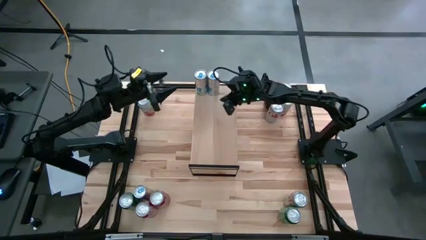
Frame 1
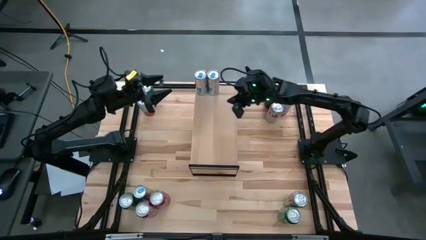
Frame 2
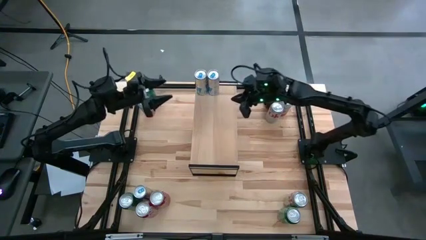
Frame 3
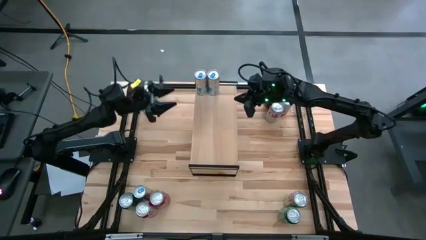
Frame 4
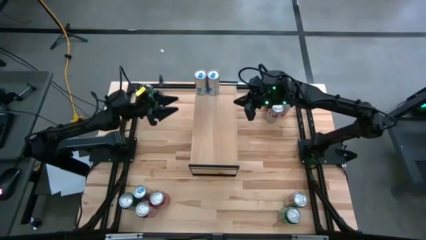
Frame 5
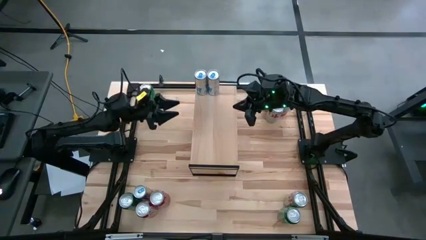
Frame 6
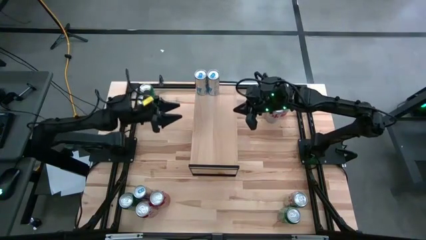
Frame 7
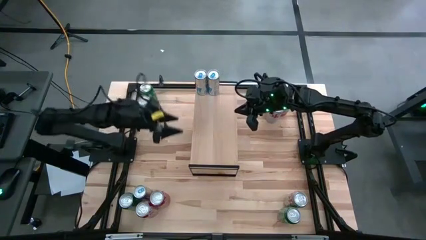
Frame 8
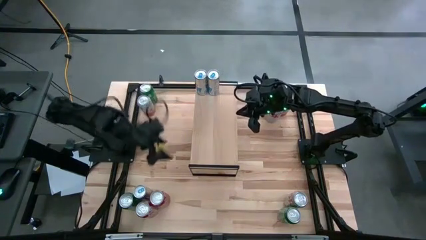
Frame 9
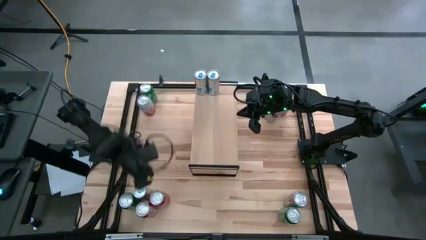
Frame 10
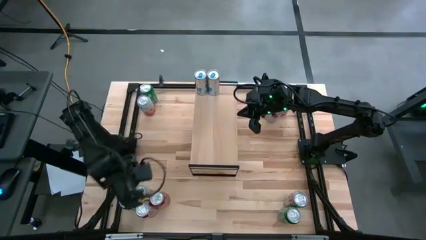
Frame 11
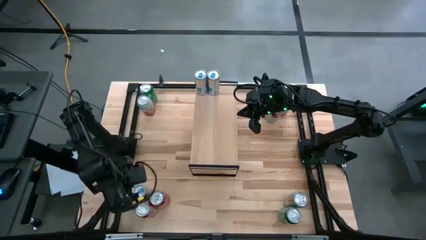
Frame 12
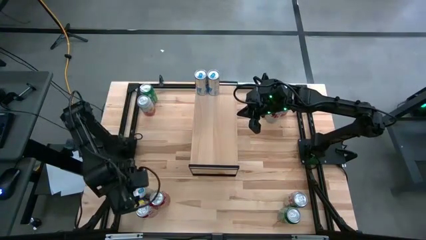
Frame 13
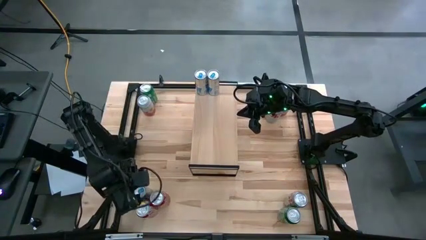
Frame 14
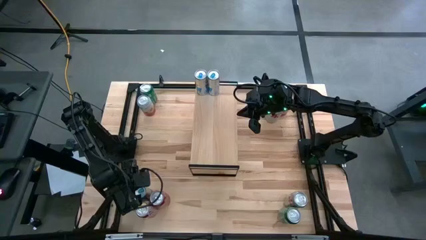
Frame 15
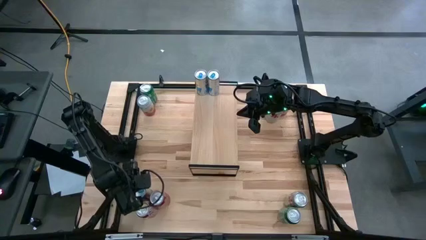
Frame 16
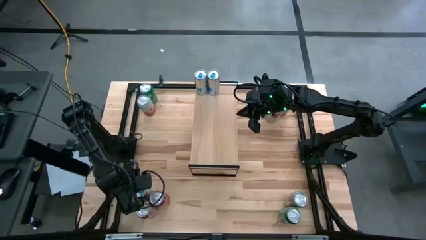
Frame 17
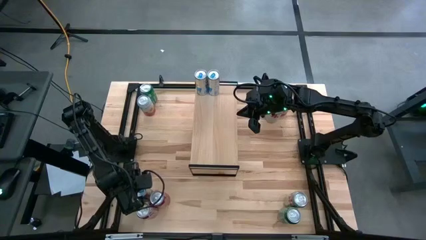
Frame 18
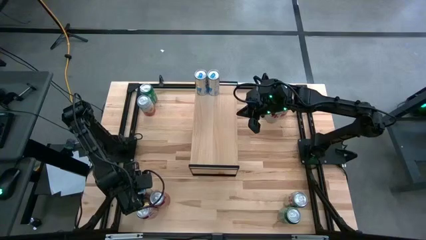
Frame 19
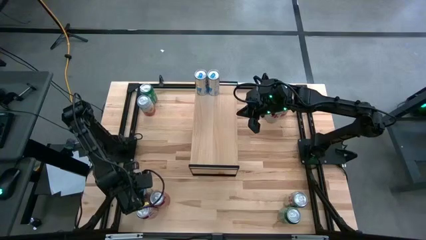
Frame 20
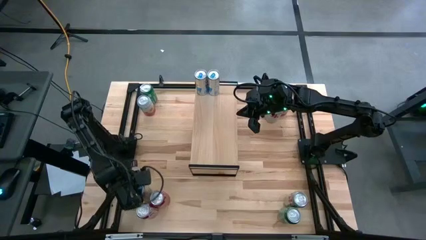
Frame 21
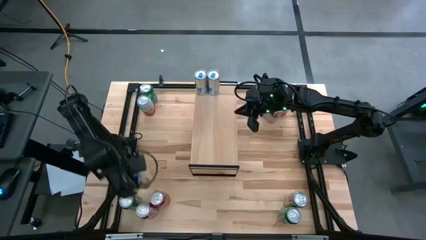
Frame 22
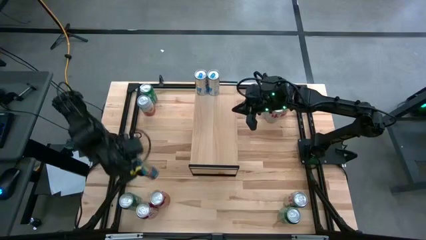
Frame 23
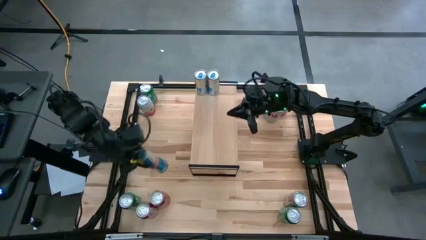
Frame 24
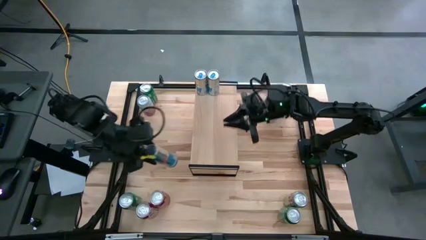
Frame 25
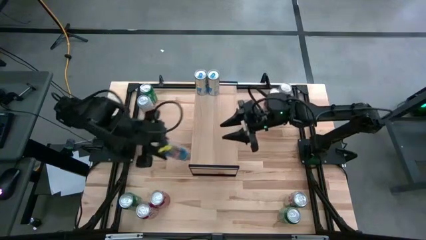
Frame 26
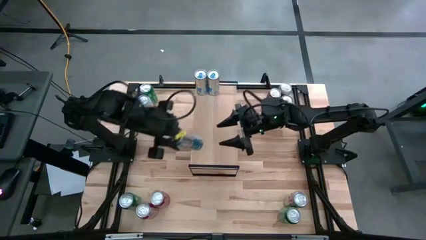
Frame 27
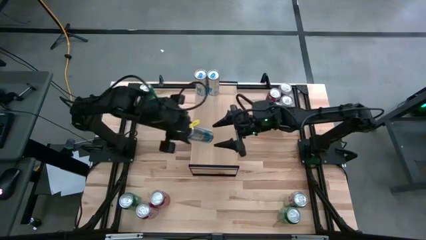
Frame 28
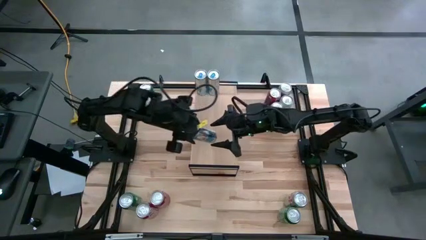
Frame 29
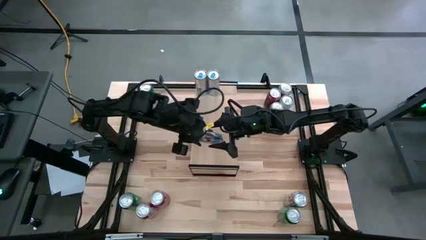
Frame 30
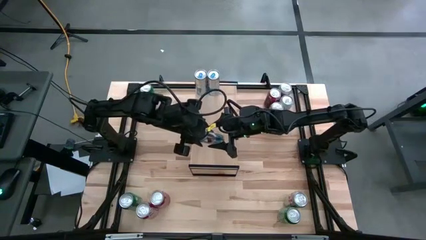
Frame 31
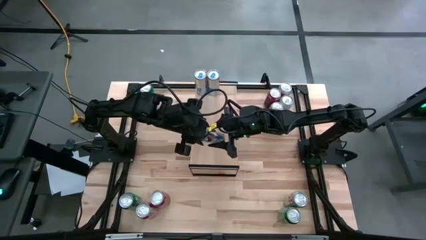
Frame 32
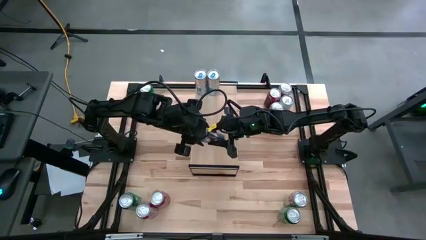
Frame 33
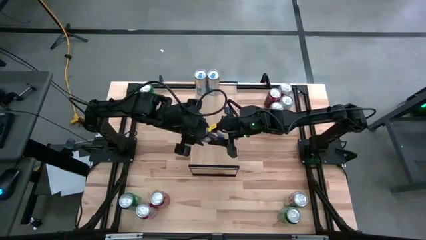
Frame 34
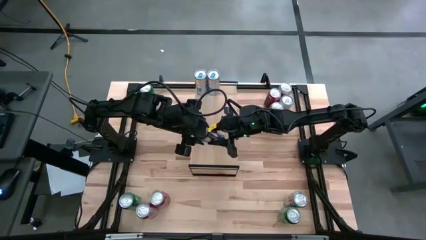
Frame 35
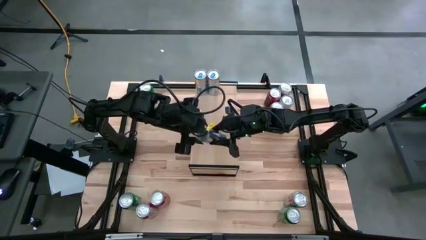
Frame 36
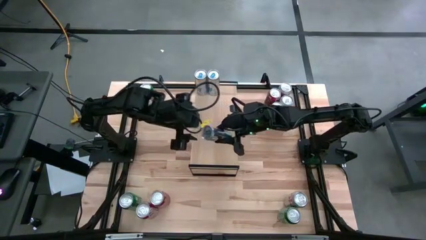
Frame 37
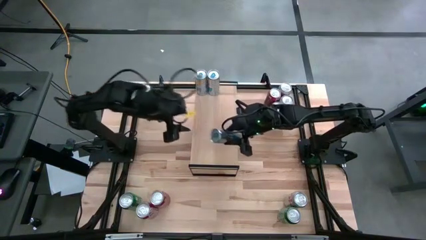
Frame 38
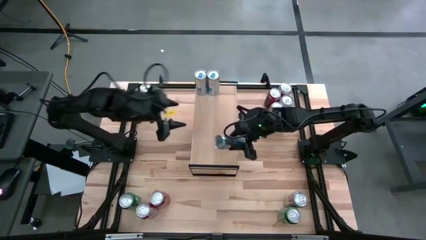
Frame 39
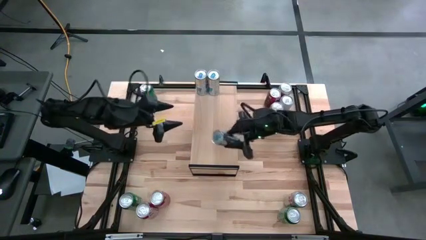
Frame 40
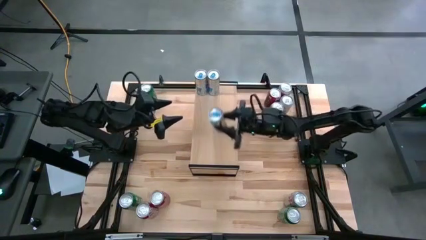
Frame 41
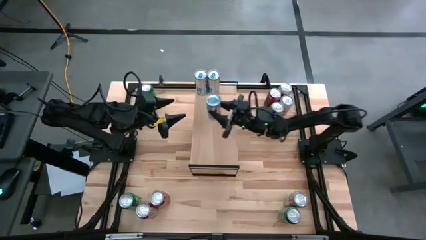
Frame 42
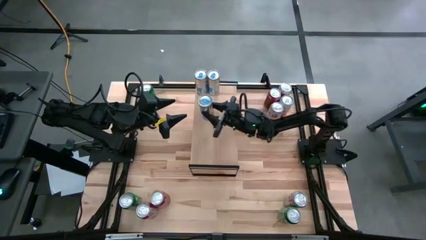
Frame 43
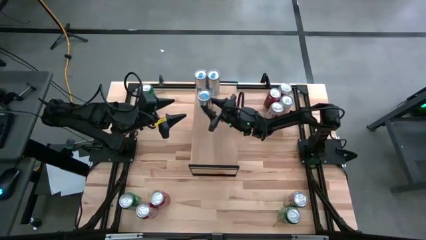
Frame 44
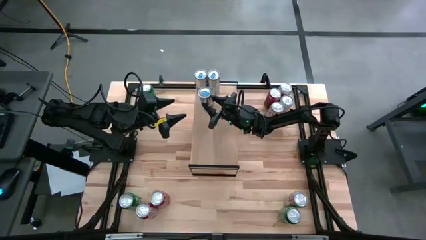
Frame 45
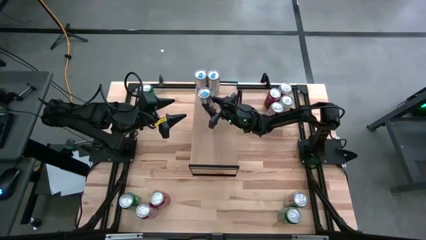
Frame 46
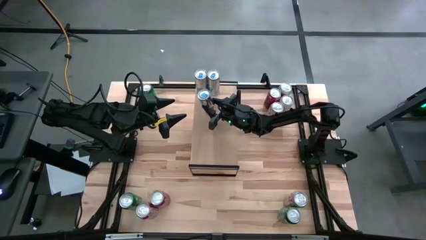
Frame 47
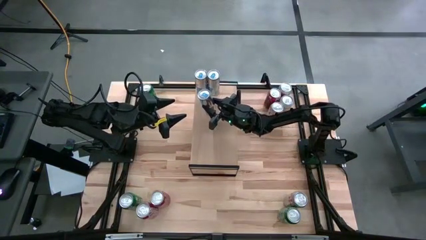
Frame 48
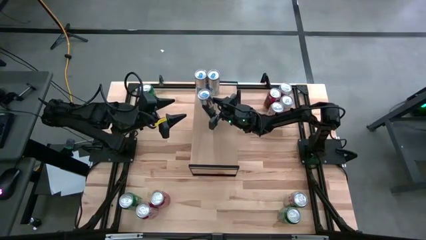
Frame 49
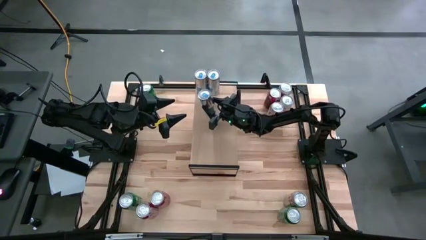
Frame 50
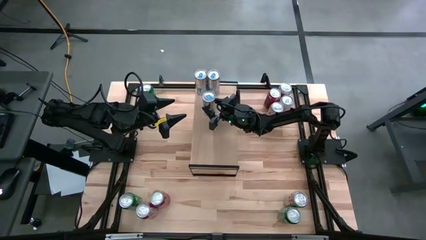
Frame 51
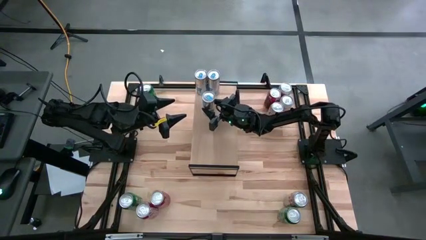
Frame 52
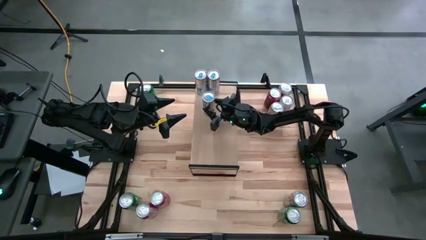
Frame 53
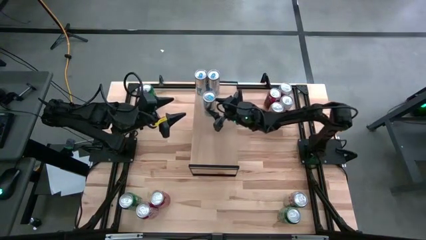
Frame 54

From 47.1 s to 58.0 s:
Task: Place canned beverage on shelf
Put the blue soda can on the shelf
